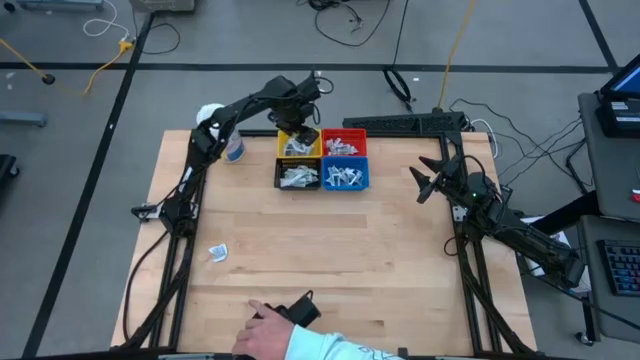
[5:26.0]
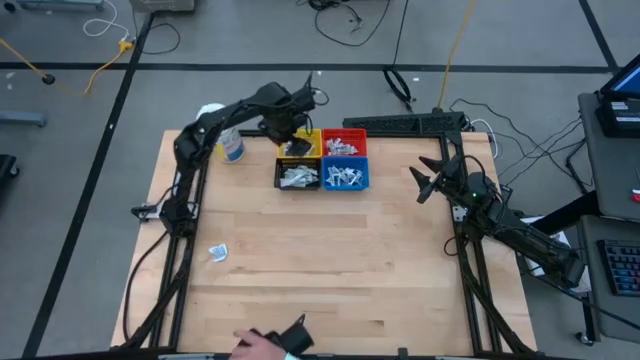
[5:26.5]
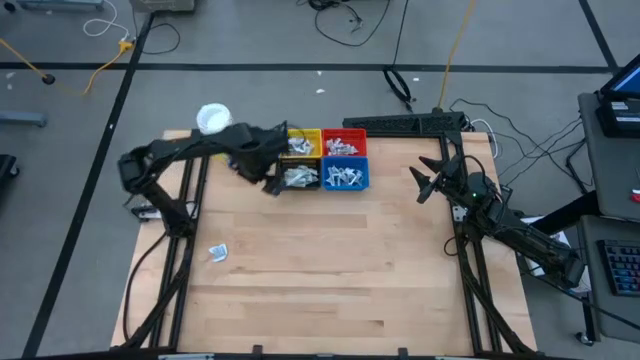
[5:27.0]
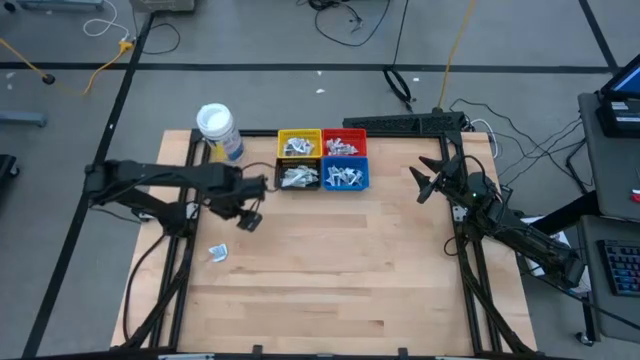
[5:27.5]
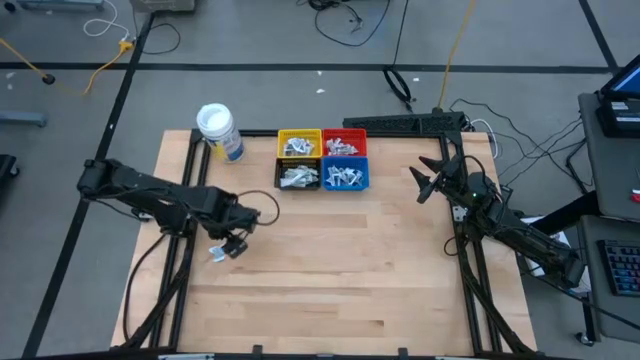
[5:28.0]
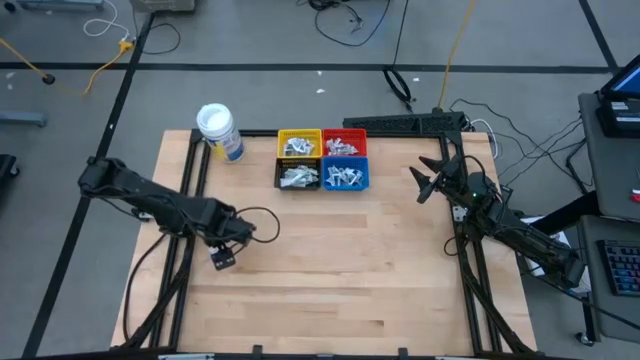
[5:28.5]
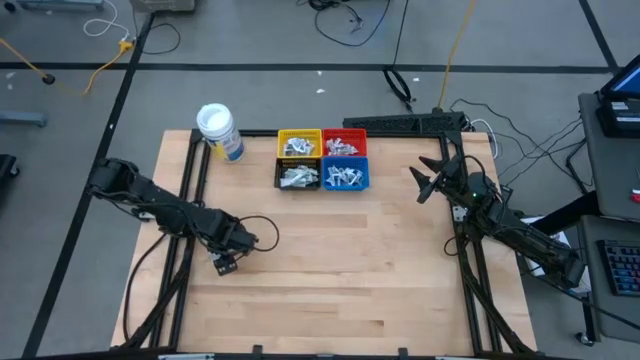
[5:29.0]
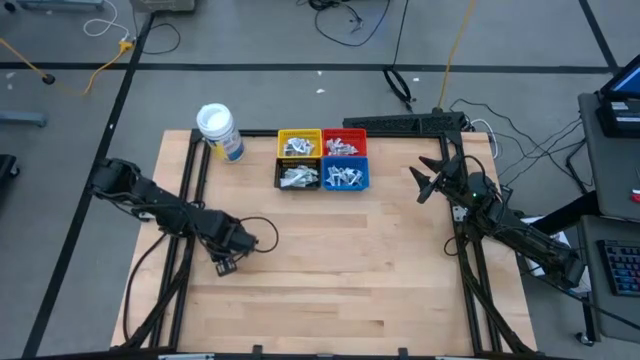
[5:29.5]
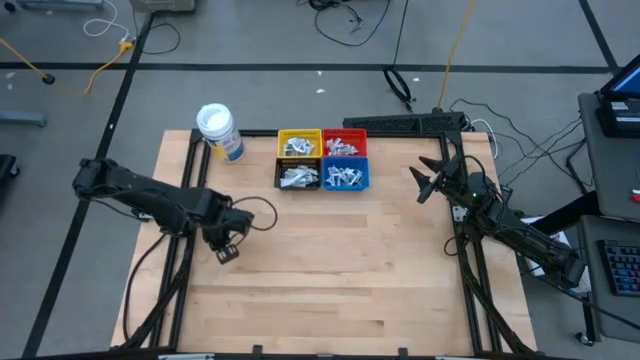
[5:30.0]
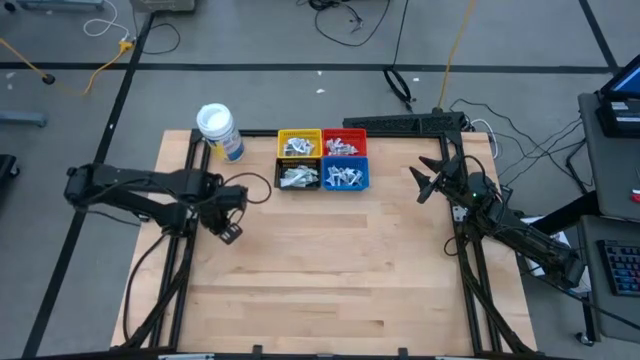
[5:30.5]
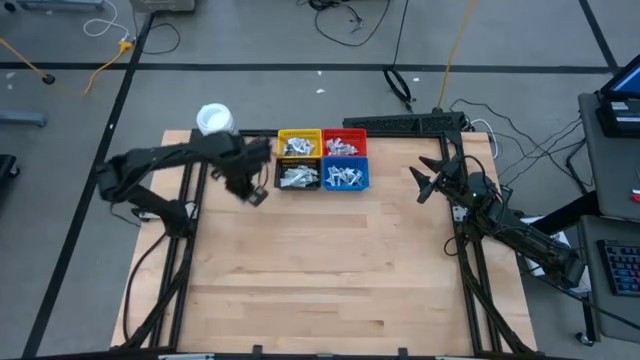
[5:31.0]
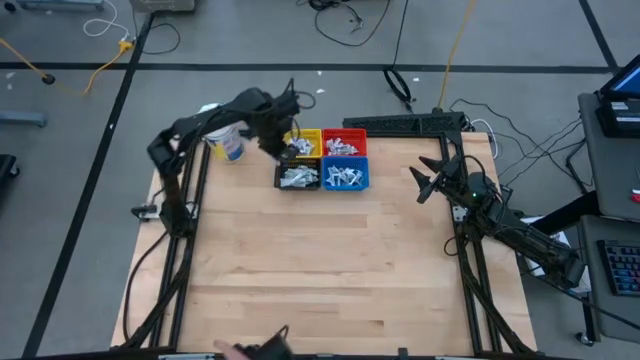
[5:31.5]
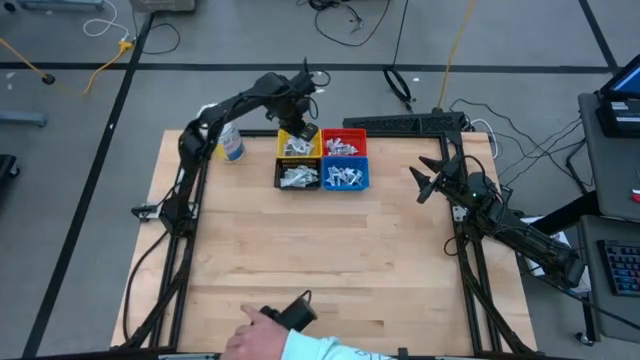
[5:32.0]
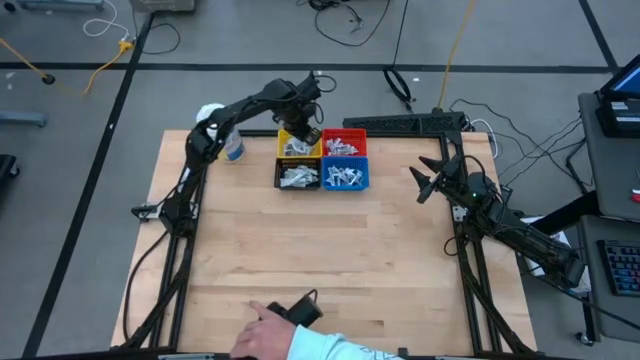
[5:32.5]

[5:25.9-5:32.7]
Task: Pick & Place First Aid Supplies
Put the gray towelette pack into the yellow basket

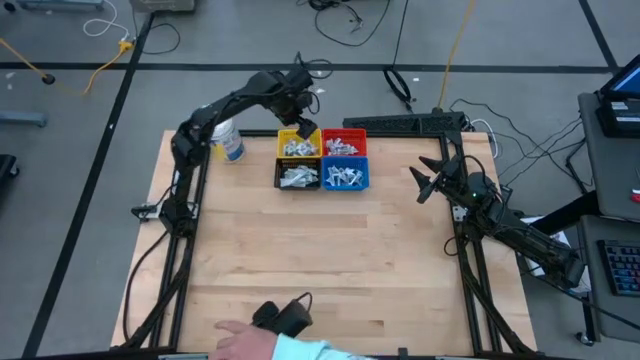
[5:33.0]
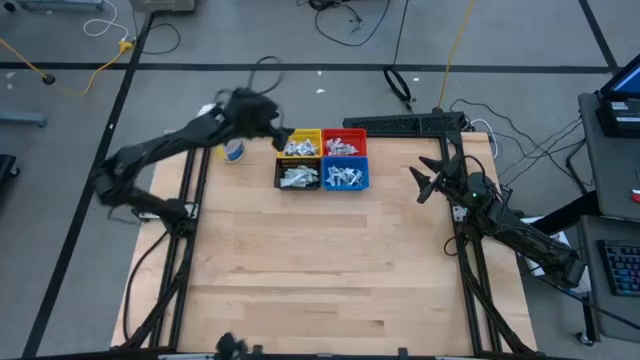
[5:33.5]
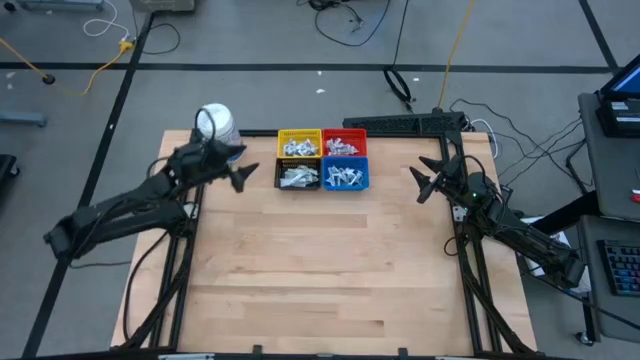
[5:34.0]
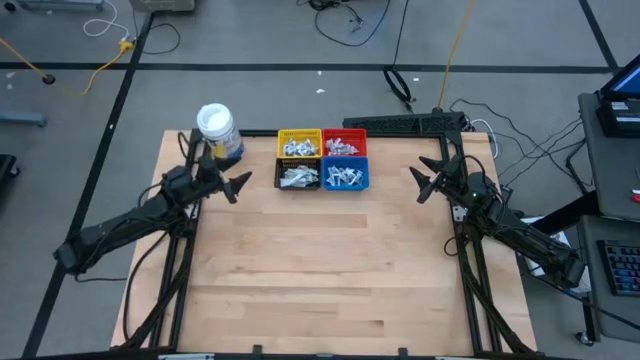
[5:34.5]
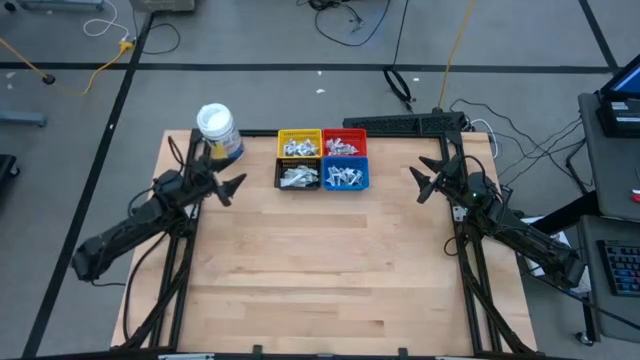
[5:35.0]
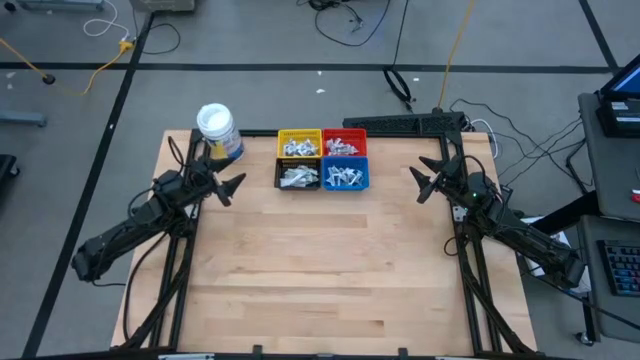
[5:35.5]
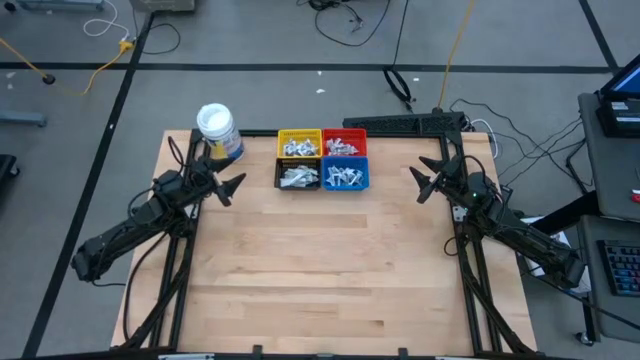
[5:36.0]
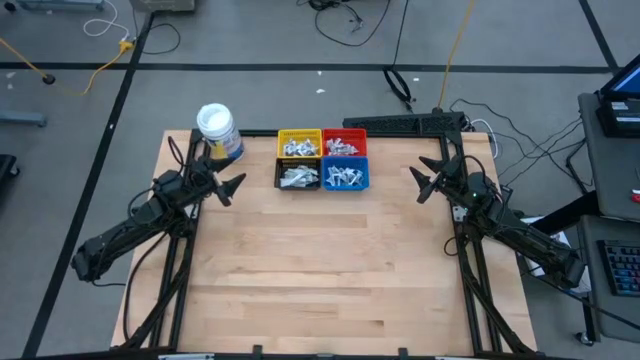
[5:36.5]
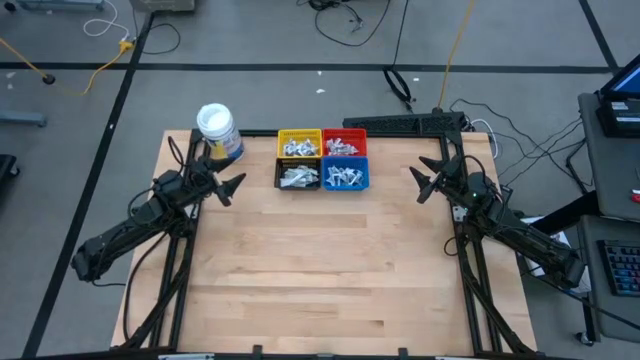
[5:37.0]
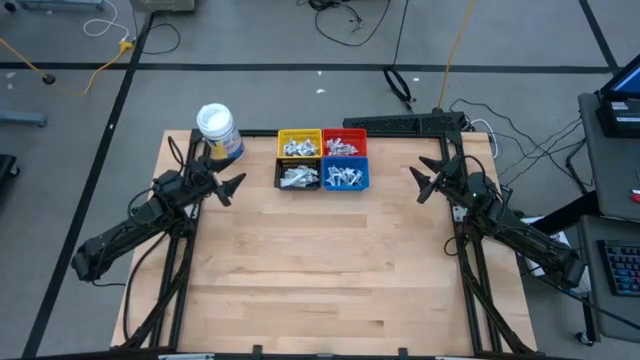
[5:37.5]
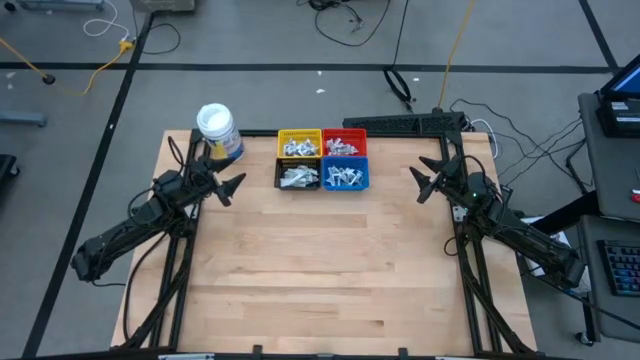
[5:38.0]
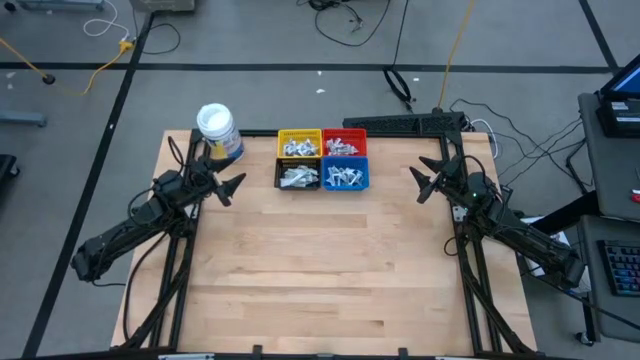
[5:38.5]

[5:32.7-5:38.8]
Return to Home Position

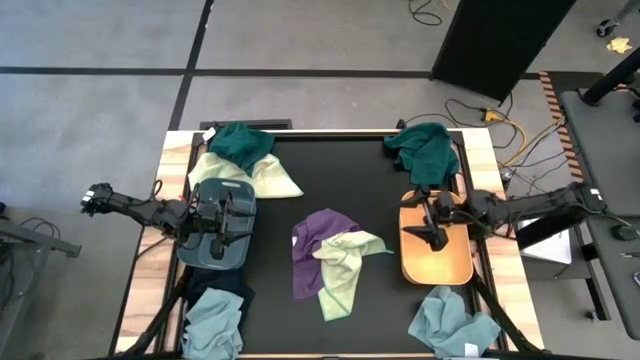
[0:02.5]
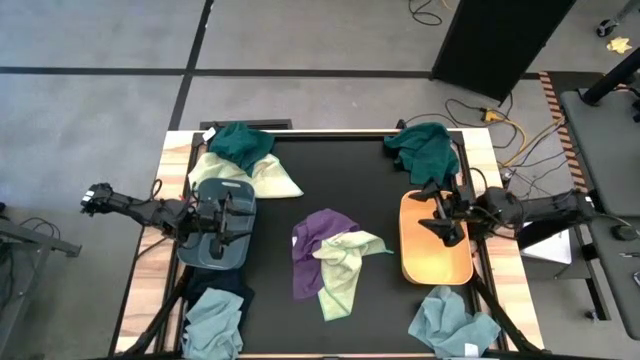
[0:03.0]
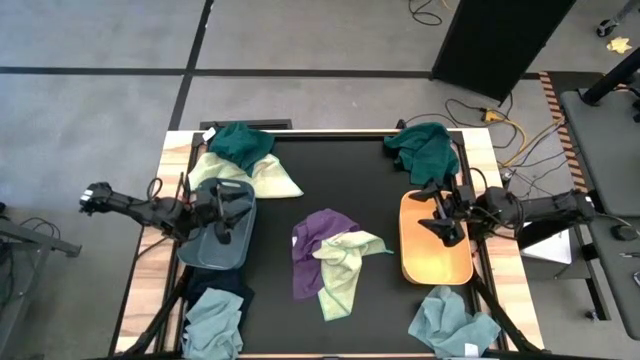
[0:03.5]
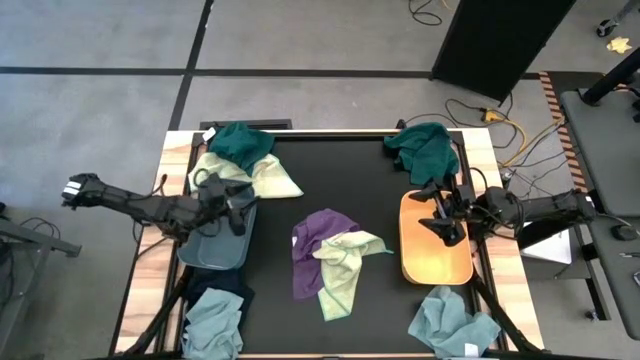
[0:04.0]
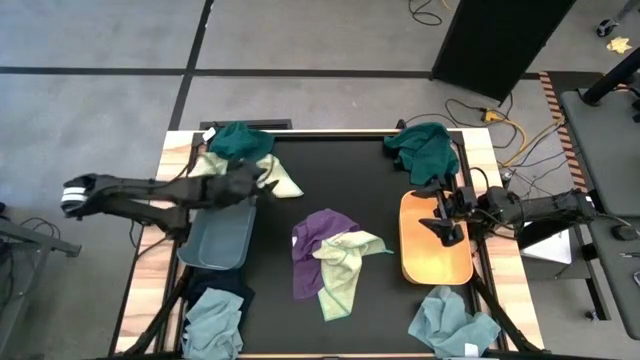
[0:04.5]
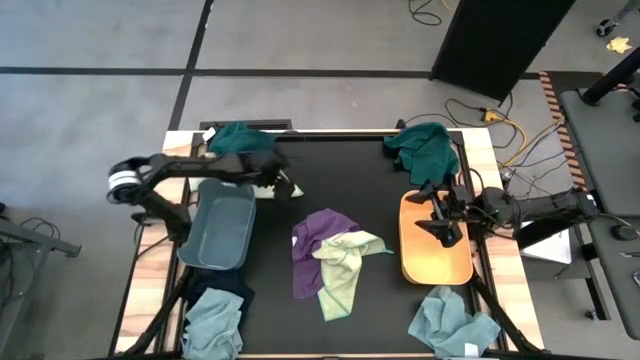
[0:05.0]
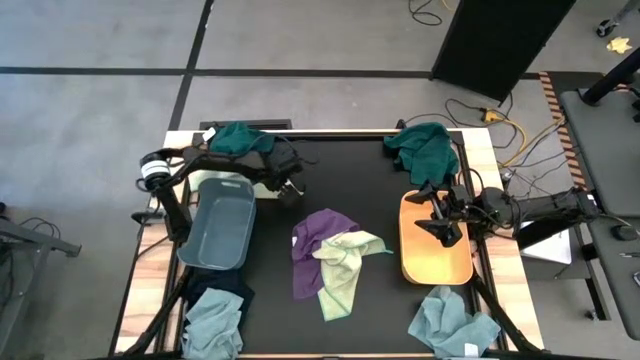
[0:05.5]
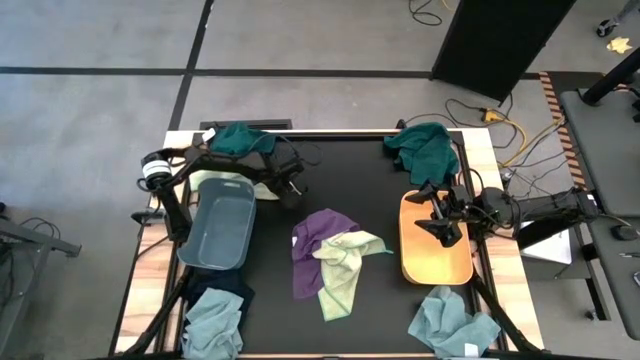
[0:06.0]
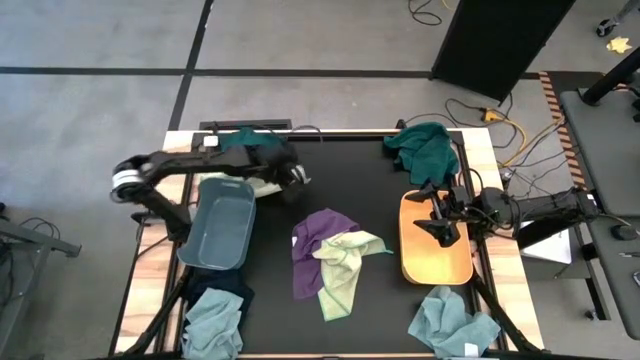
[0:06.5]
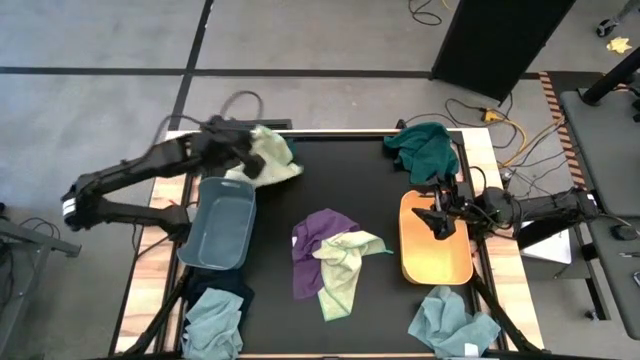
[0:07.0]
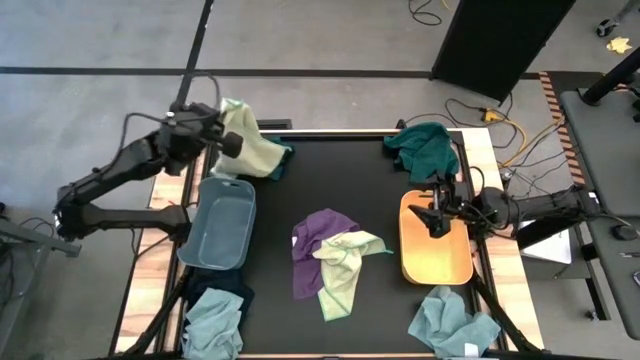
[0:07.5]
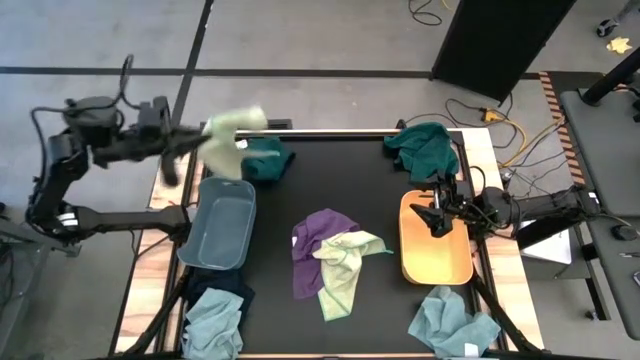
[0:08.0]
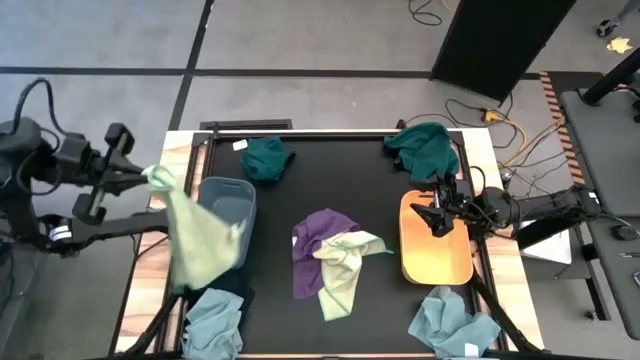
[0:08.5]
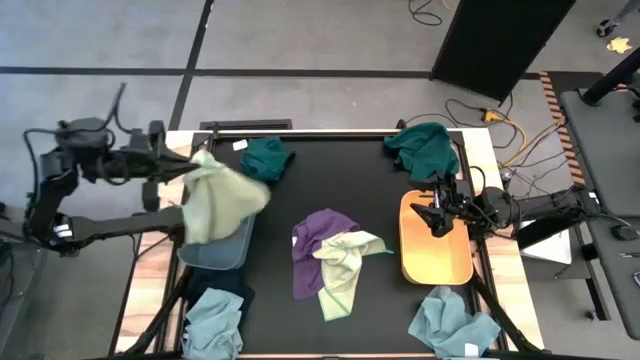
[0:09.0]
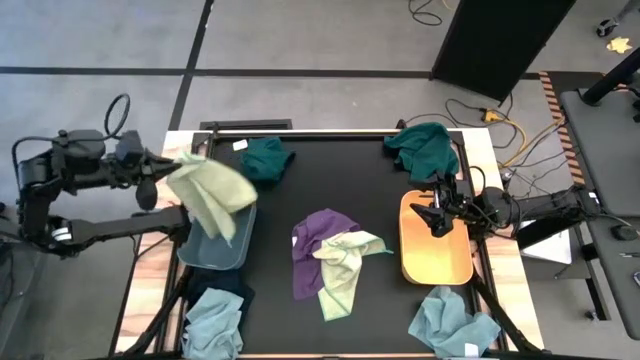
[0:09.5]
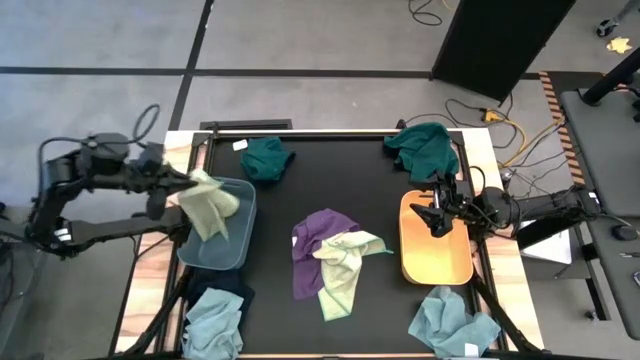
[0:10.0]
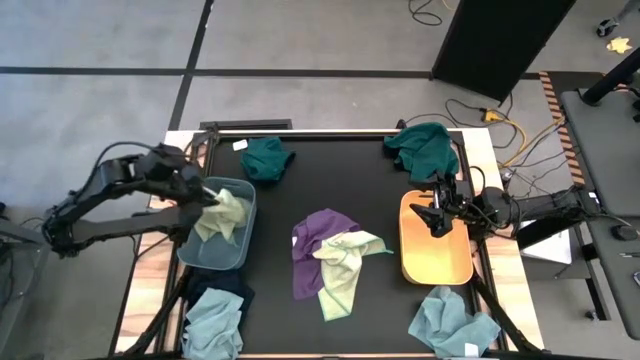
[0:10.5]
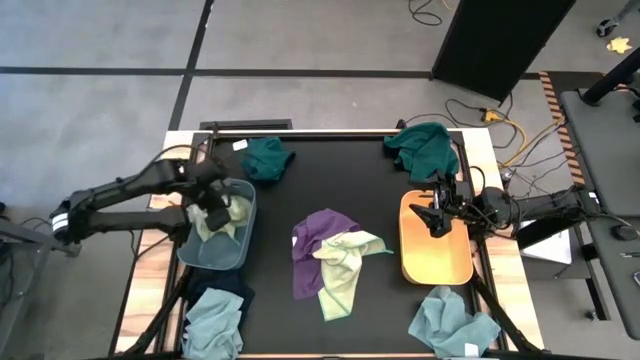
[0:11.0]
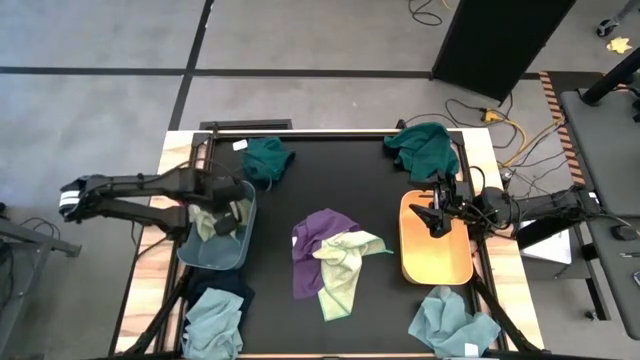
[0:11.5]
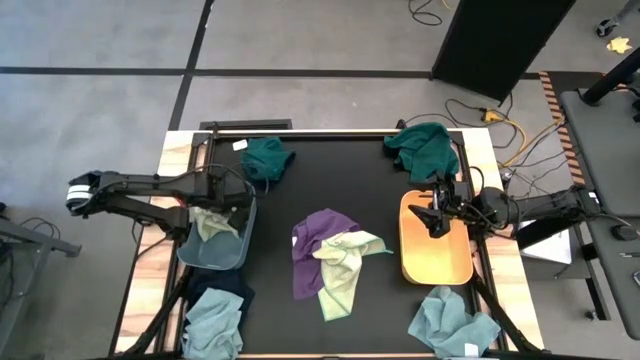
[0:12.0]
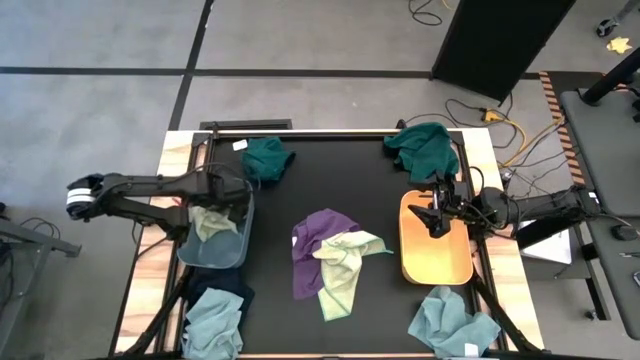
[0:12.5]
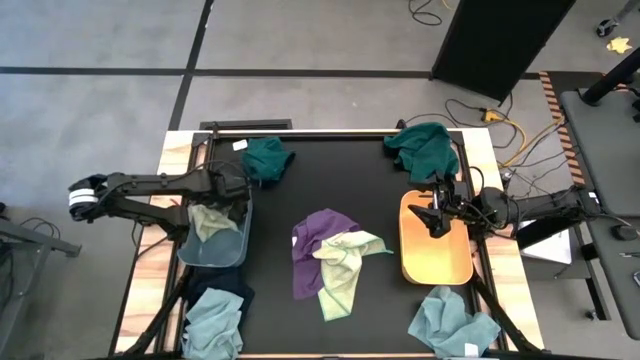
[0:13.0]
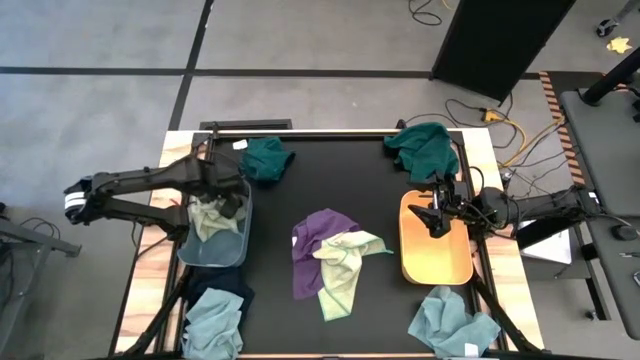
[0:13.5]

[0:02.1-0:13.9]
Task: Sort microfiber towel by color & place in baskets
Put the top light green microfiber towel into the blue bin
